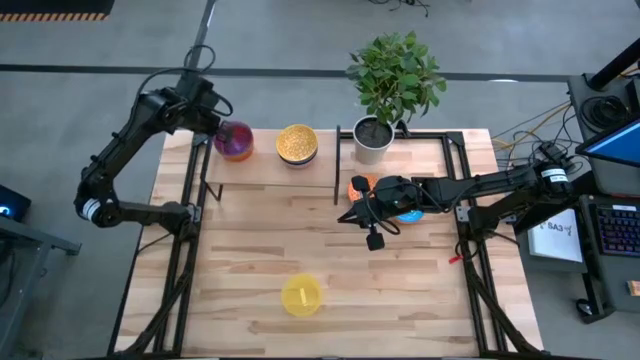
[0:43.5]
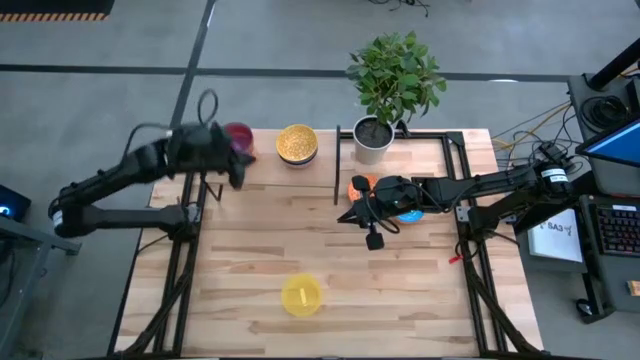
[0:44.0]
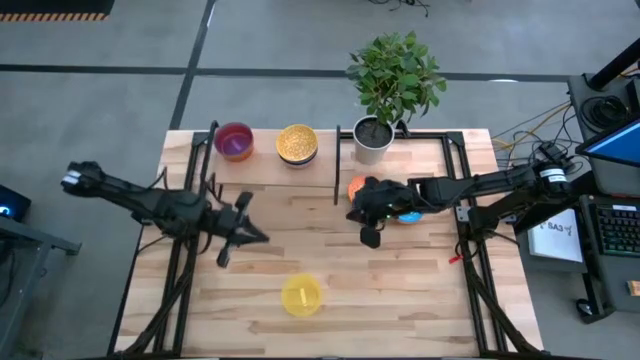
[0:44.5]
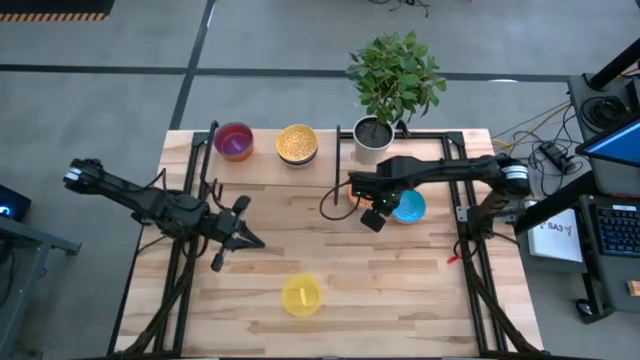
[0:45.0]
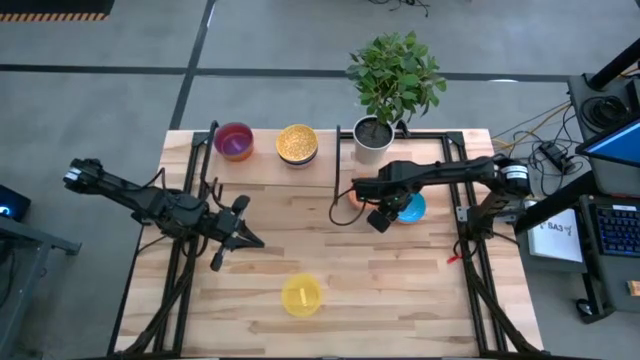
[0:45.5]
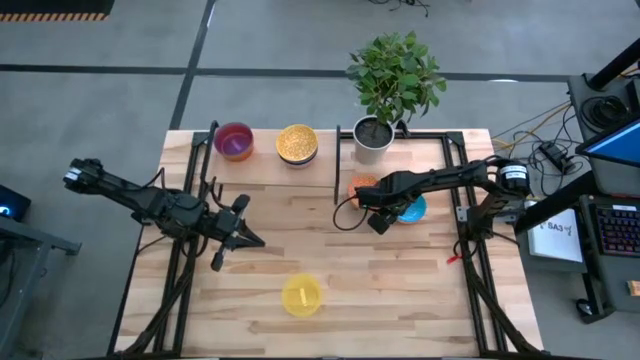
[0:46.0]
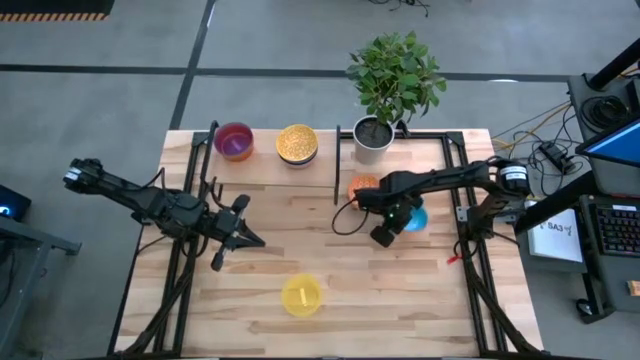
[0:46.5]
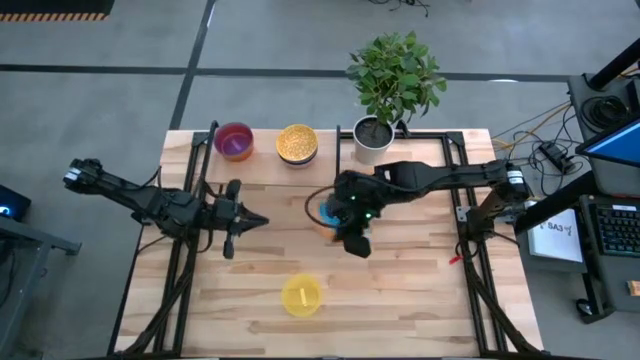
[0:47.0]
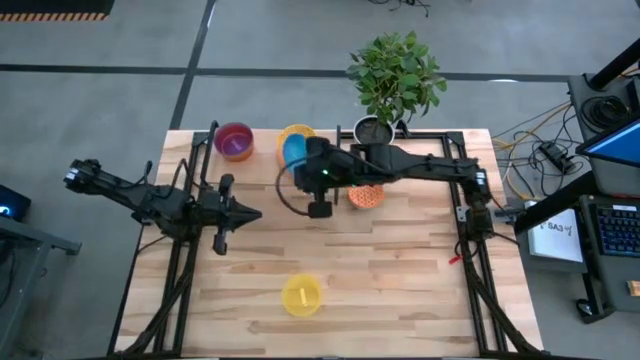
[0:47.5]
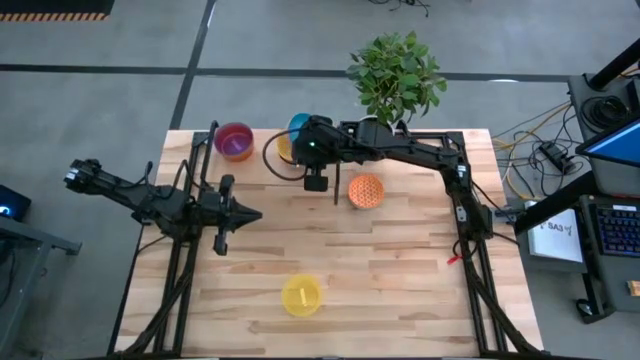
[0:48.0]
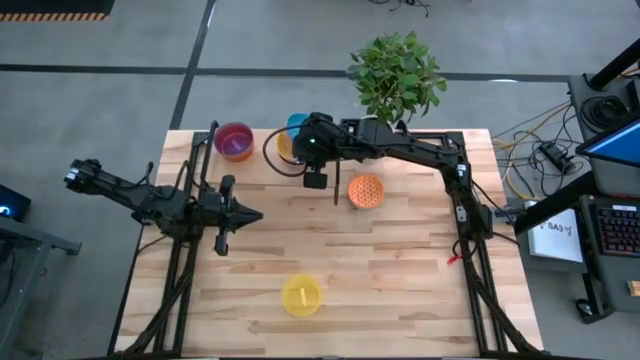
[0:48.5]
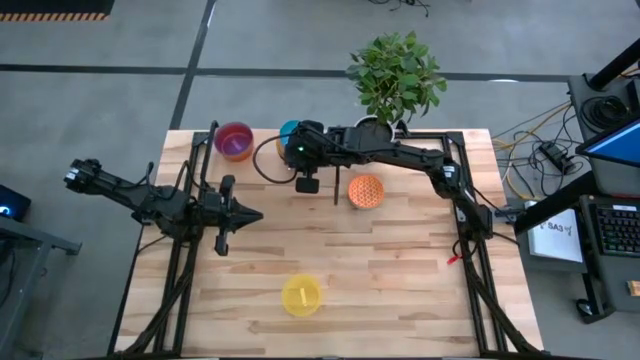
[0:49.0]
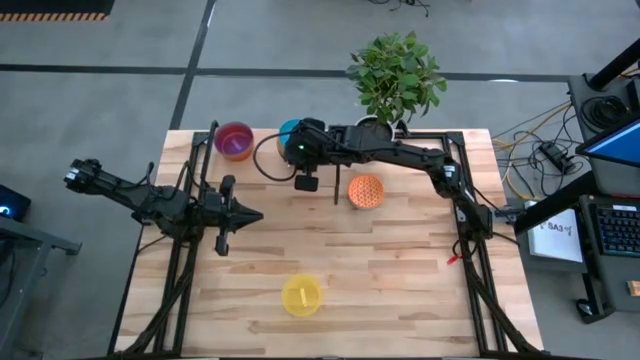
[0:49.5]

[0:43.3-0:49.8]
Task: Place and stack bowls onto a shelf
Stack the orange bowl on the yellow bowl on the shelf

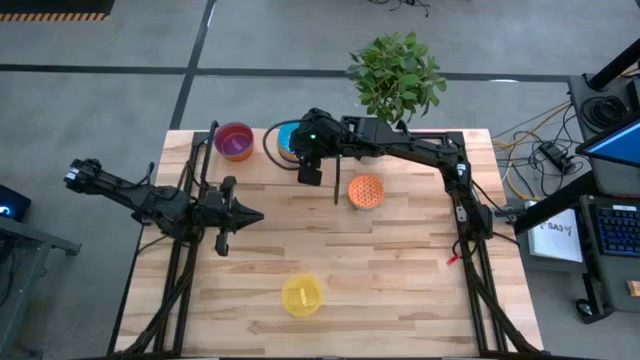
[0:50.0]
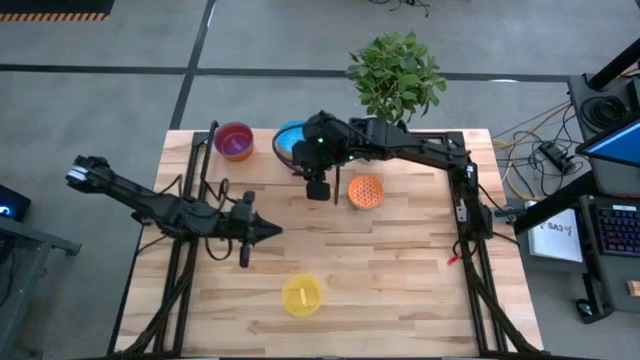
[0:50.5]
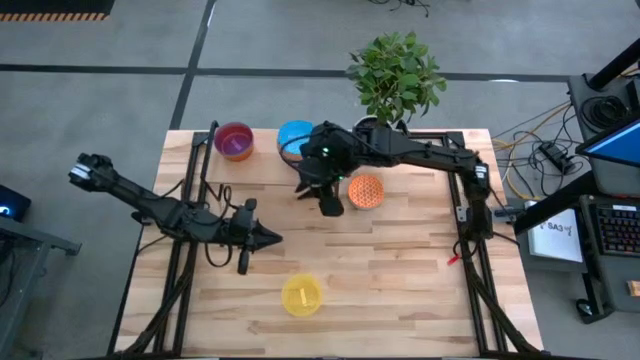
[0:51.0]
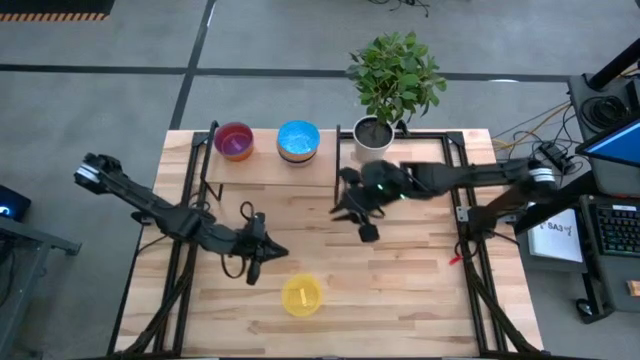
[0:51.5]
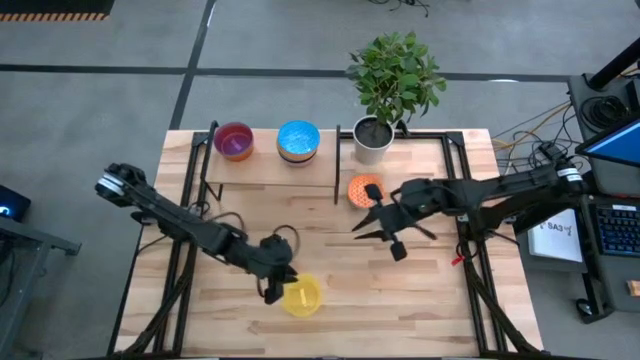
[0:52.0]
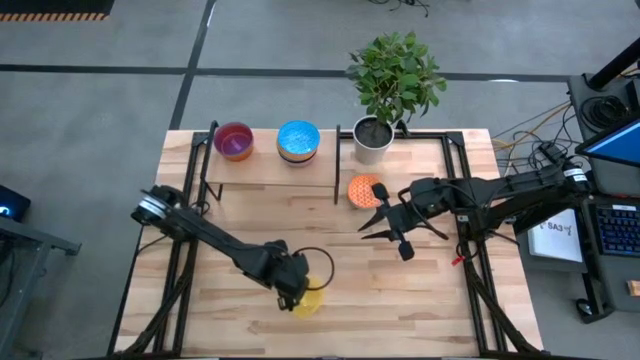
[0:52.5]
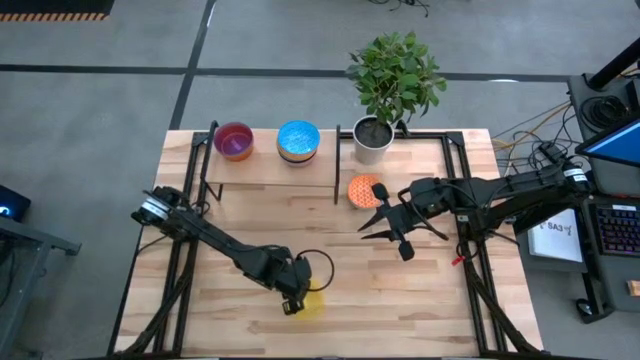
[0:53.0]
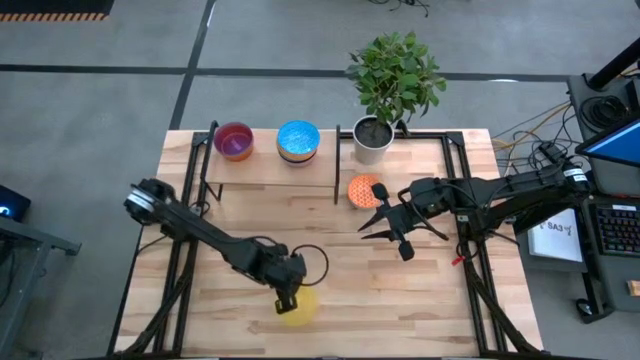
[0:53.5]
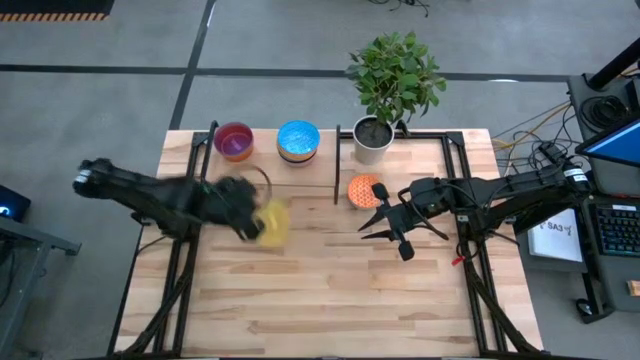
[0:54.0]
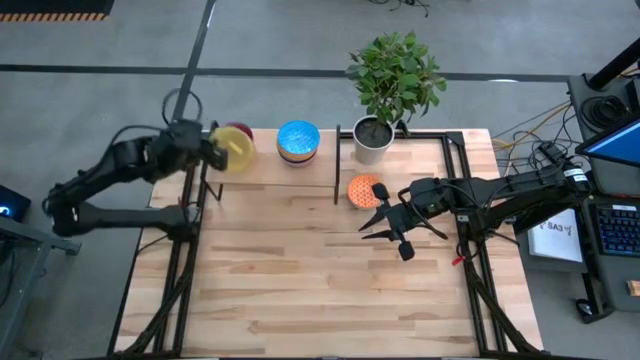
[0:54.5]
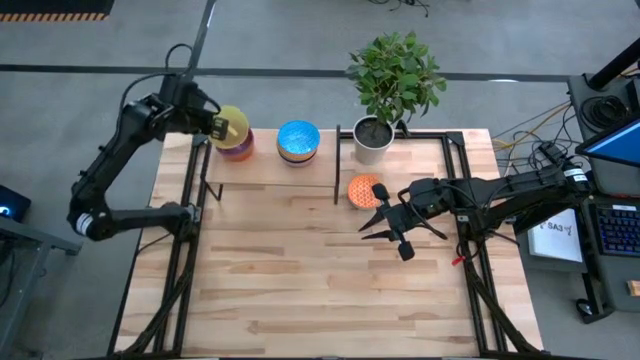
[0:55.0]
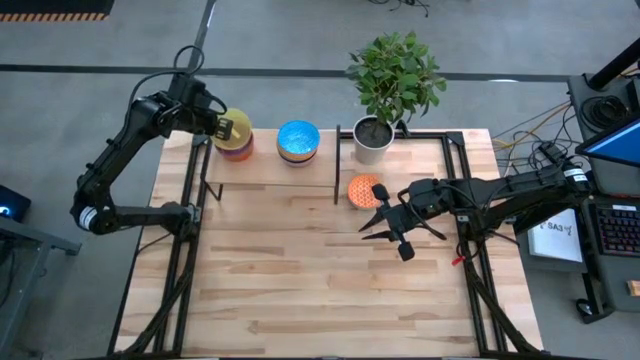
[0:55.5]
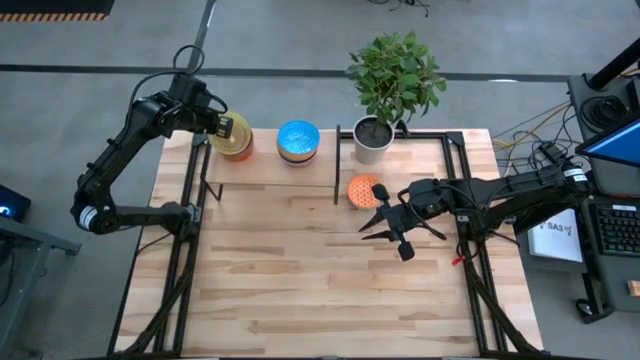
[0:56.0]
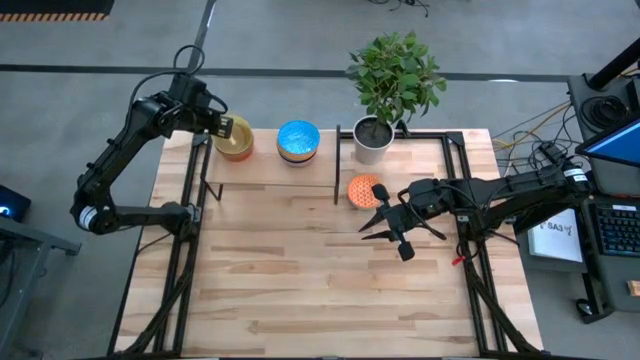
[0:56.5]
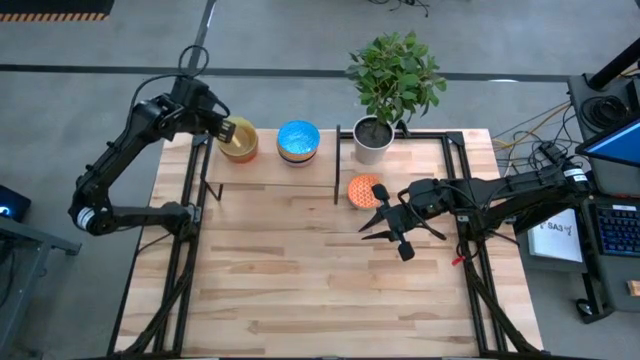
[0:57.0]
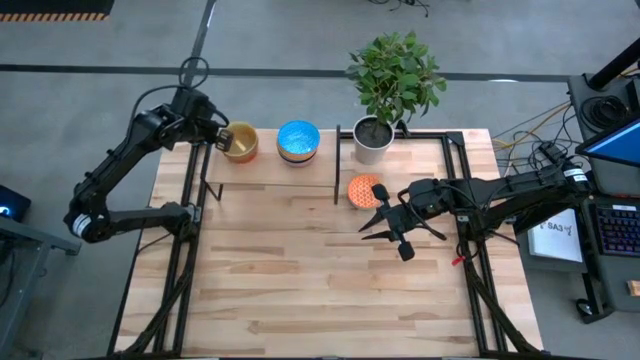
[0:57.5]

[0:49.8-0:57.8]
Stack the yellow bowl on the purple bowl on the shelf

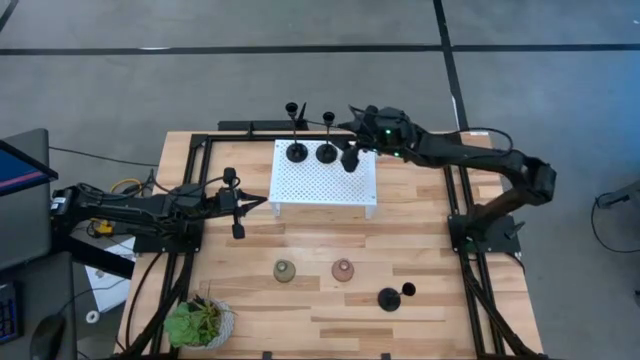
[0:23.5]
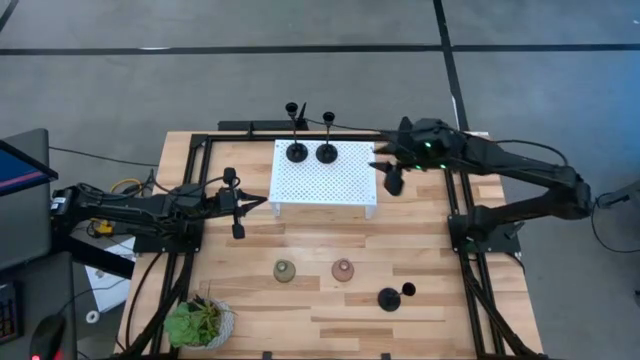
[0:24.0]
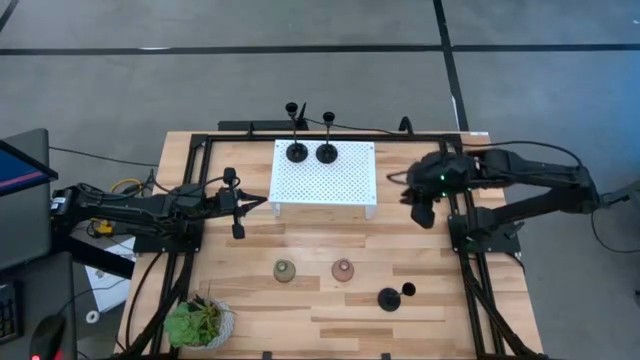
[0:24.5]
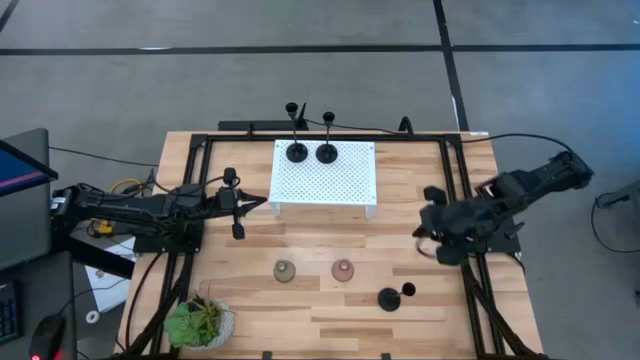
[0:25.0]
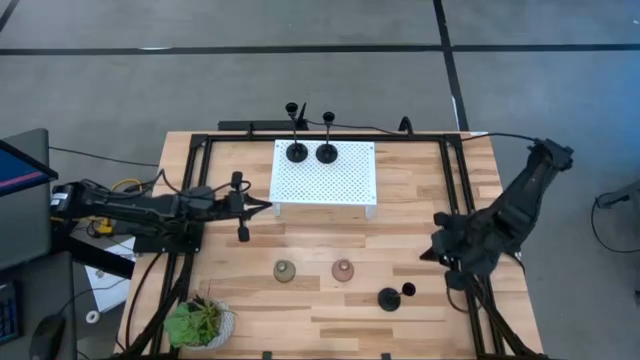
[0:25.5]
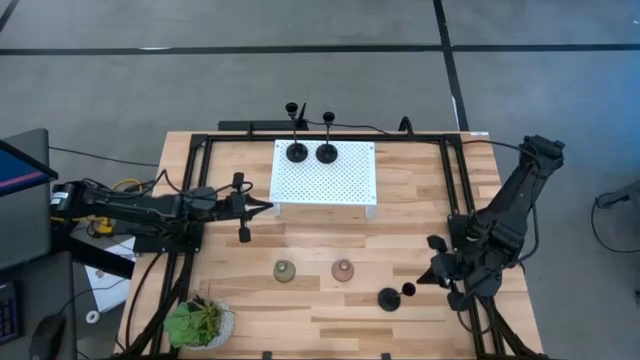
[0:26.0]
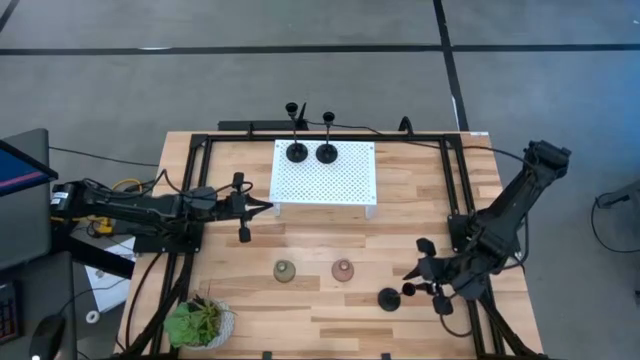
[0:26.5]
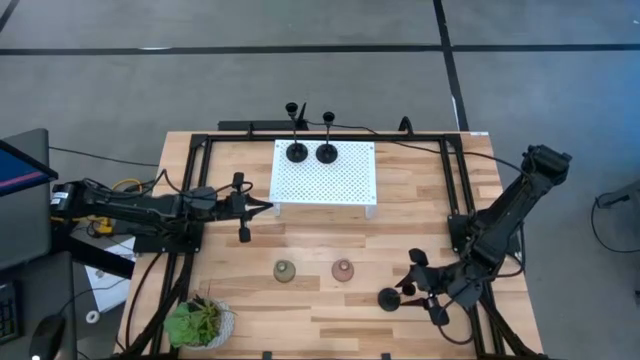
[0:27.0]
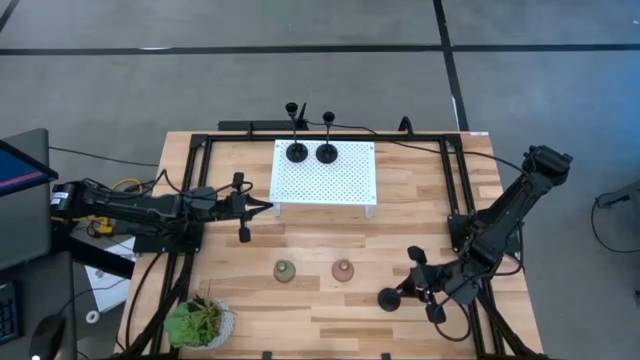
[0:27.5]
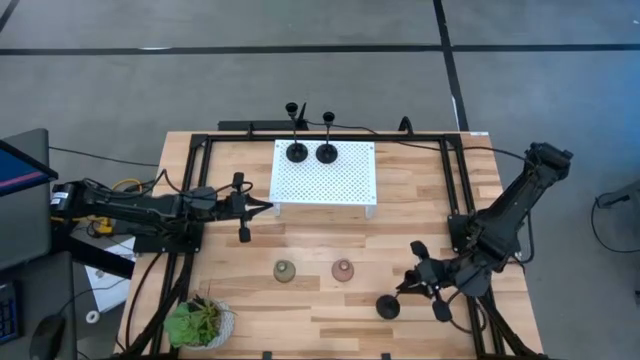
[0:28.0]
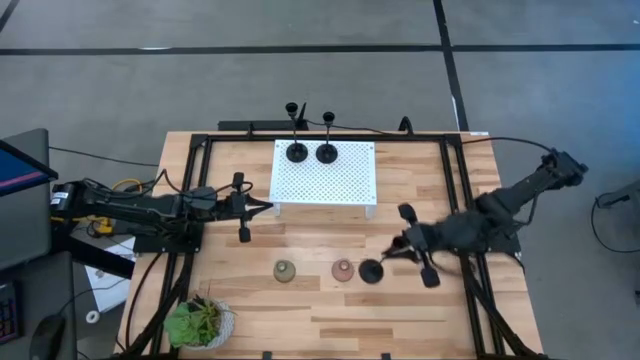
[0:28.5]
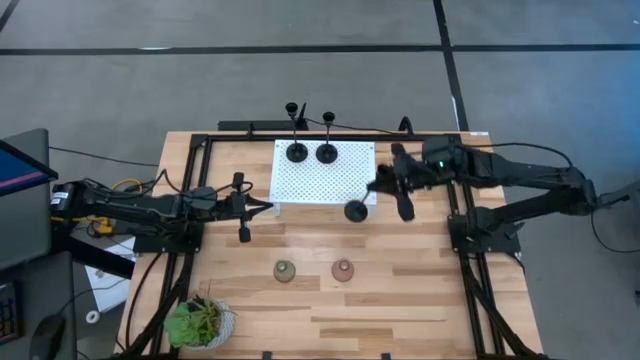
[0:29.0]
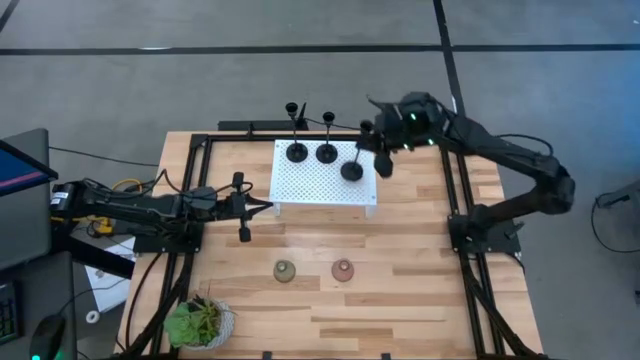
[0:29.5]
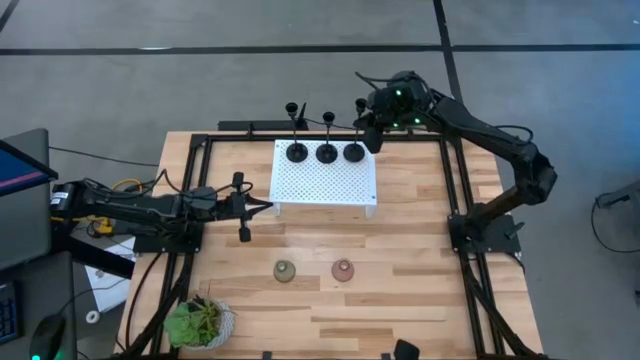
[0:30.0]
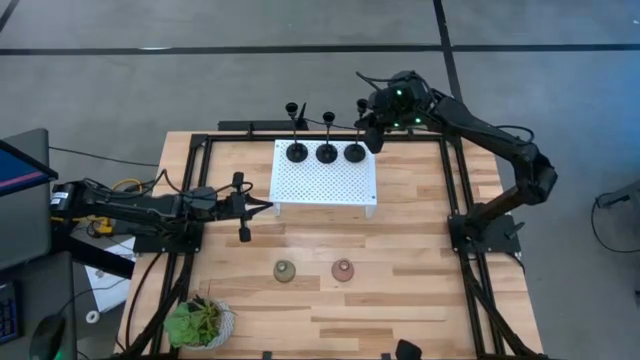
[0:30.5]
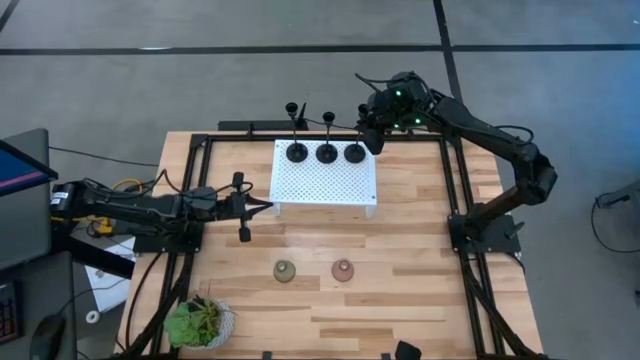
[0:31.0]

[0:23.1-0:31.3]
Task: Pick & Place candle stick holders
Put the black candle holder on the shelf
